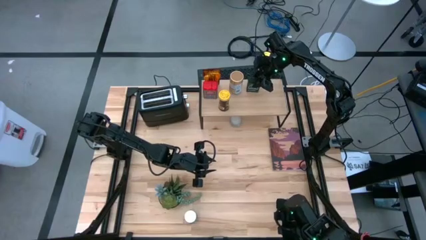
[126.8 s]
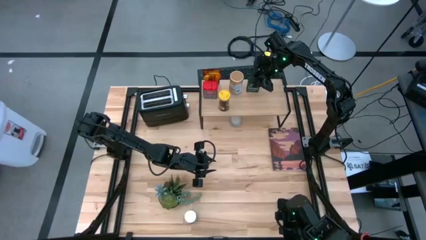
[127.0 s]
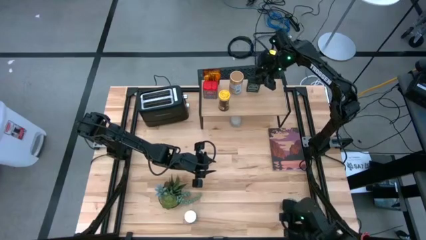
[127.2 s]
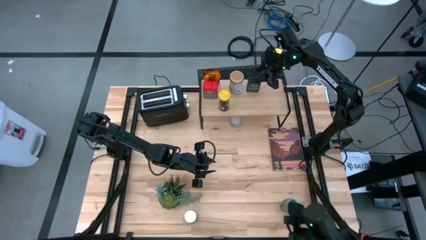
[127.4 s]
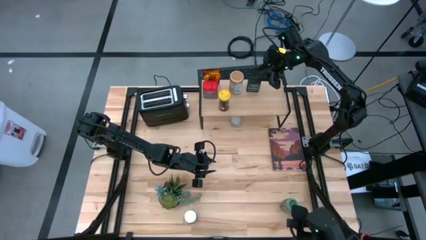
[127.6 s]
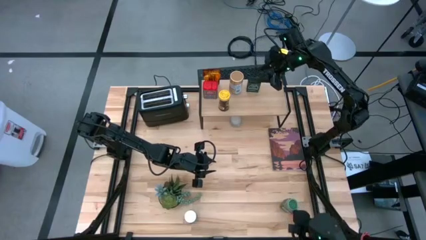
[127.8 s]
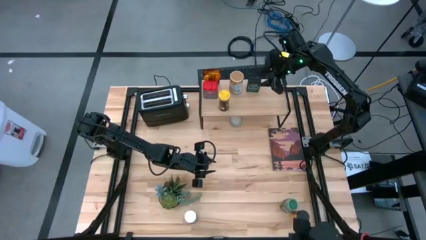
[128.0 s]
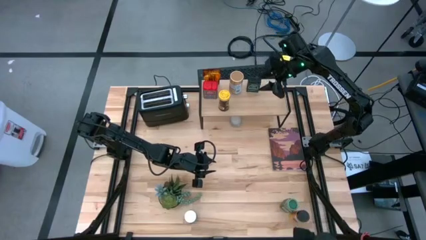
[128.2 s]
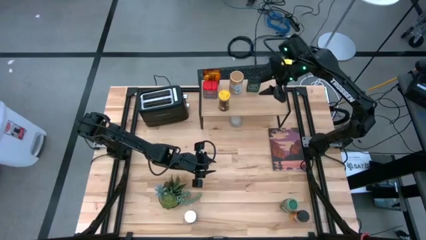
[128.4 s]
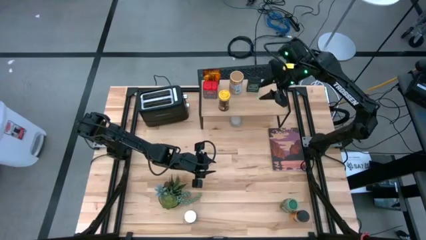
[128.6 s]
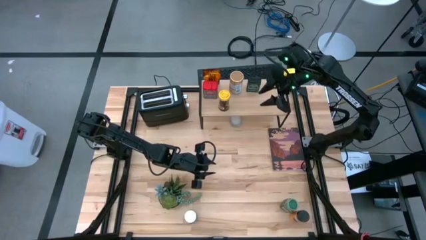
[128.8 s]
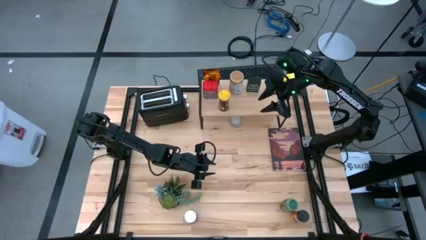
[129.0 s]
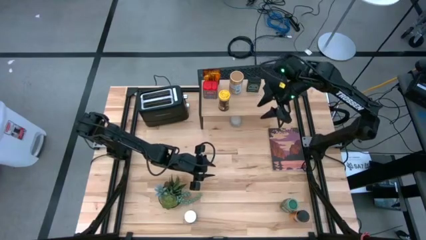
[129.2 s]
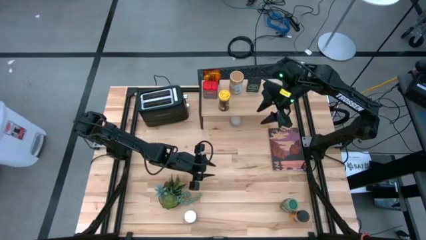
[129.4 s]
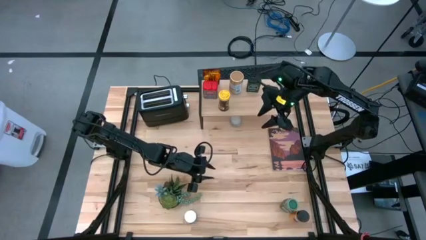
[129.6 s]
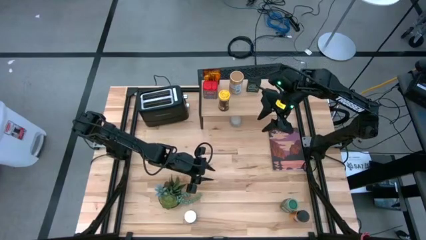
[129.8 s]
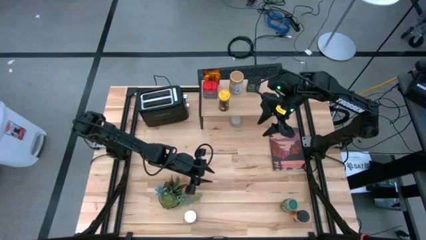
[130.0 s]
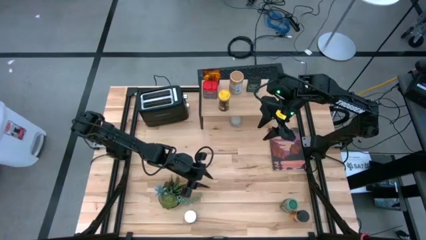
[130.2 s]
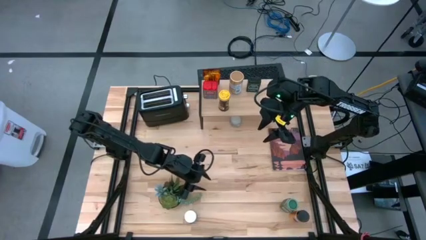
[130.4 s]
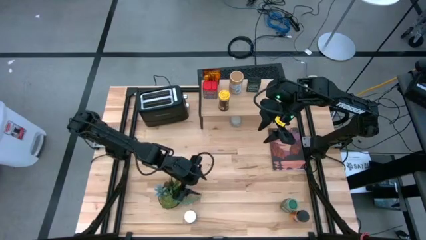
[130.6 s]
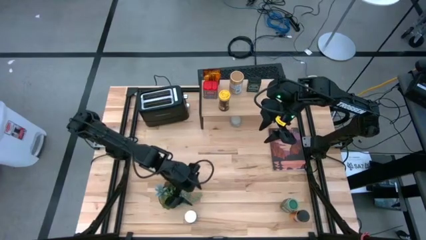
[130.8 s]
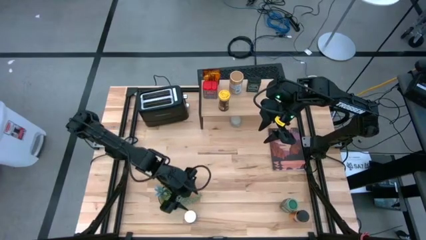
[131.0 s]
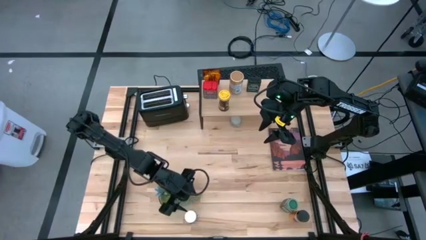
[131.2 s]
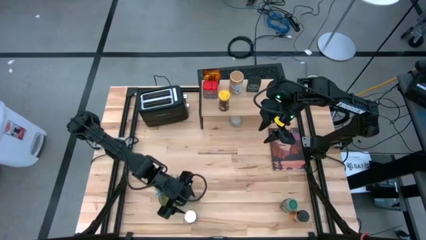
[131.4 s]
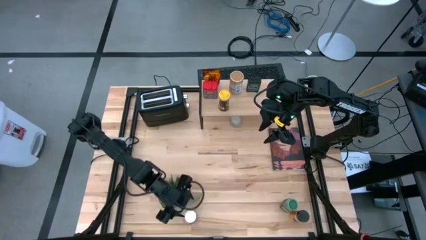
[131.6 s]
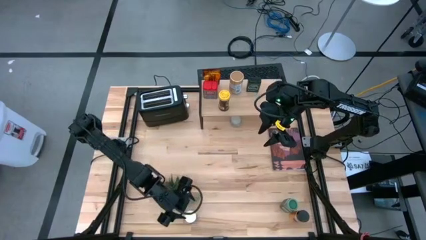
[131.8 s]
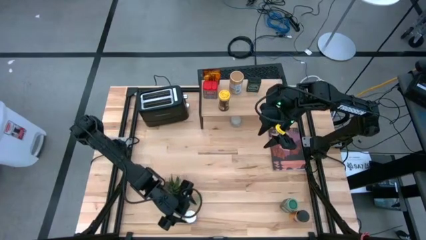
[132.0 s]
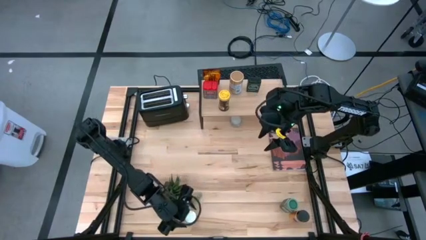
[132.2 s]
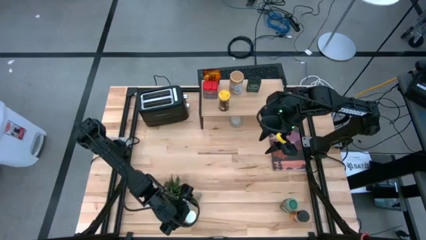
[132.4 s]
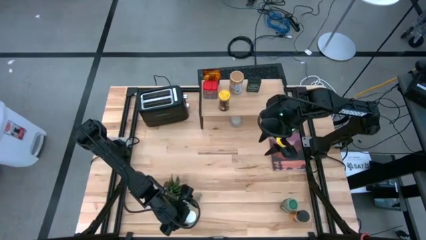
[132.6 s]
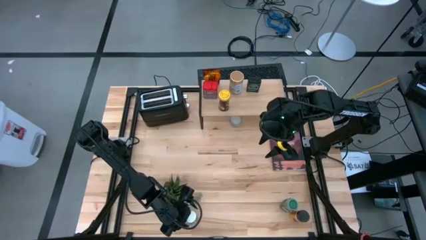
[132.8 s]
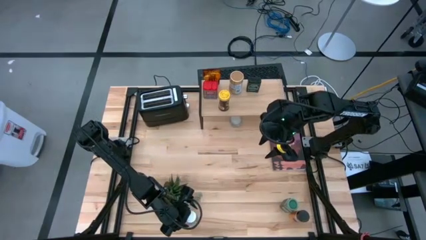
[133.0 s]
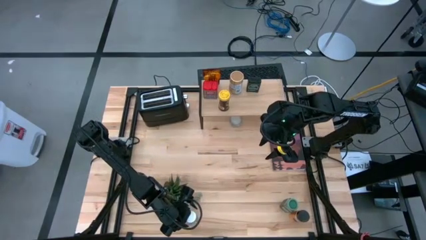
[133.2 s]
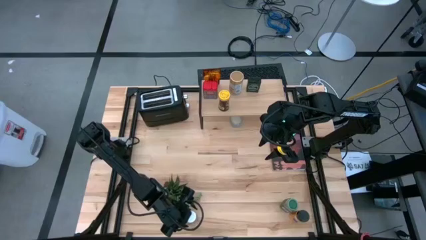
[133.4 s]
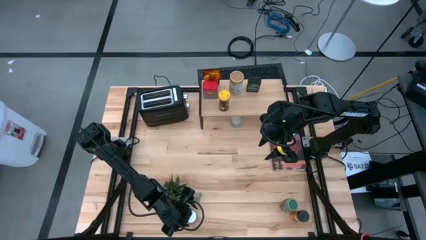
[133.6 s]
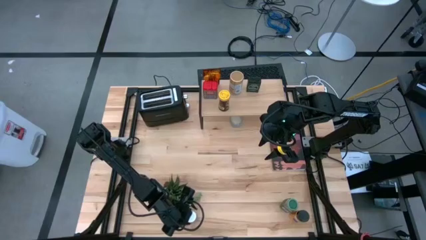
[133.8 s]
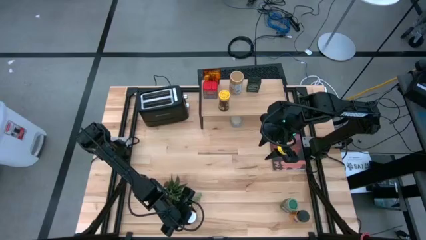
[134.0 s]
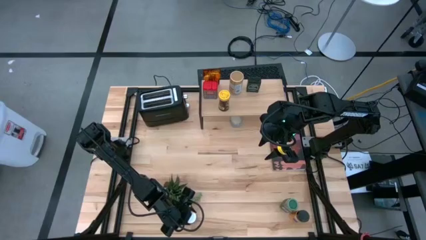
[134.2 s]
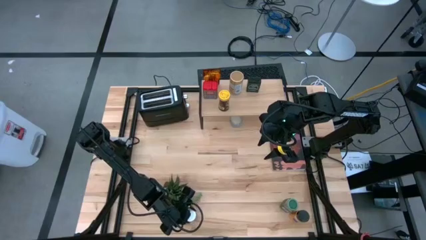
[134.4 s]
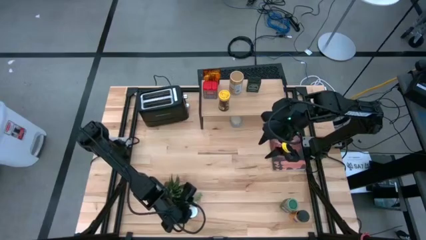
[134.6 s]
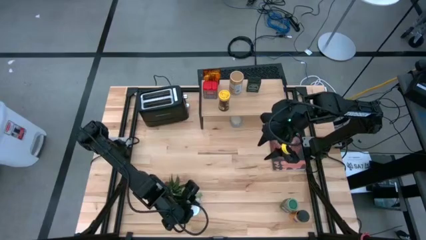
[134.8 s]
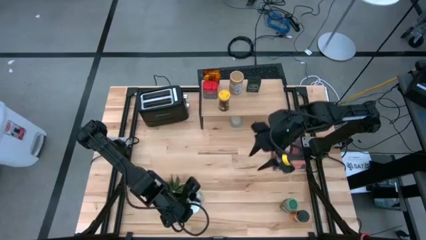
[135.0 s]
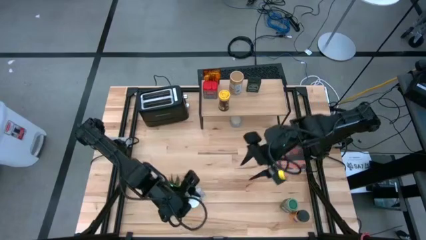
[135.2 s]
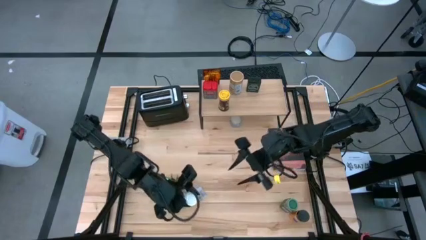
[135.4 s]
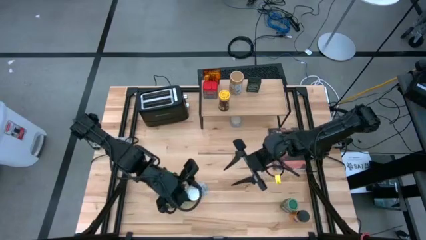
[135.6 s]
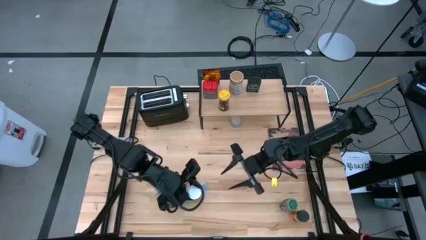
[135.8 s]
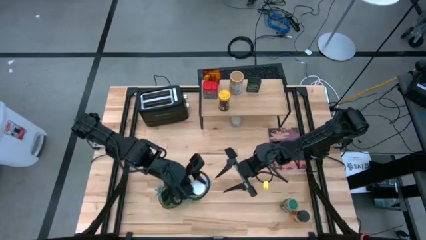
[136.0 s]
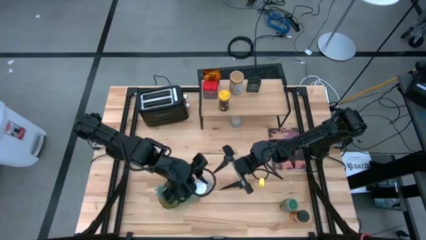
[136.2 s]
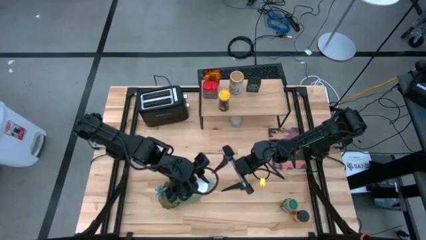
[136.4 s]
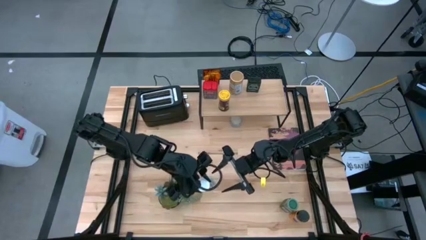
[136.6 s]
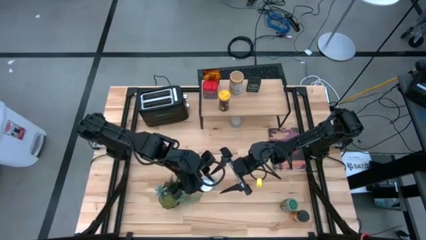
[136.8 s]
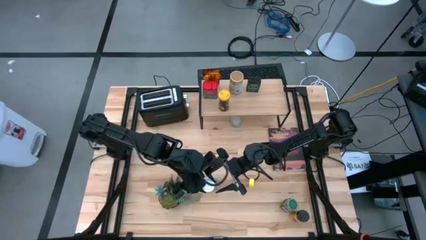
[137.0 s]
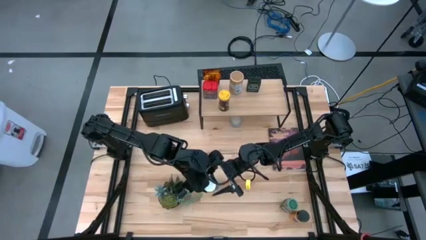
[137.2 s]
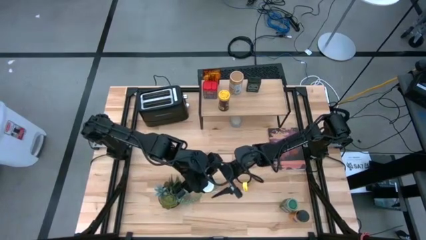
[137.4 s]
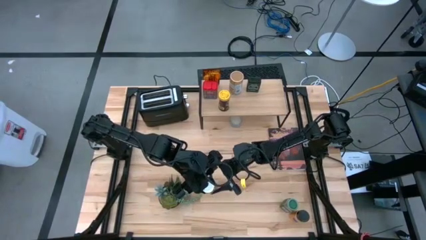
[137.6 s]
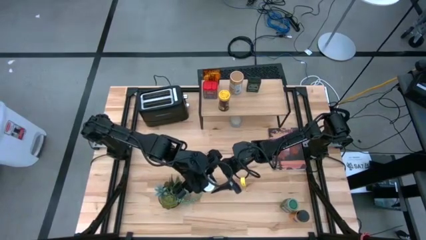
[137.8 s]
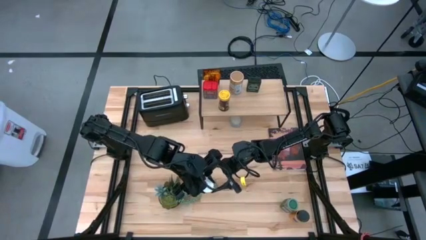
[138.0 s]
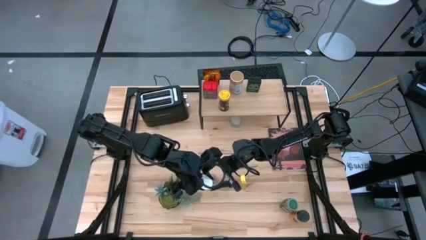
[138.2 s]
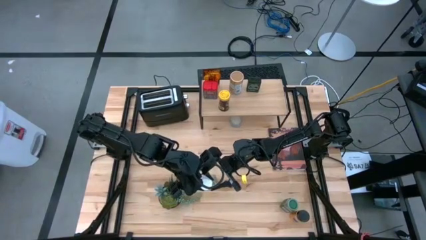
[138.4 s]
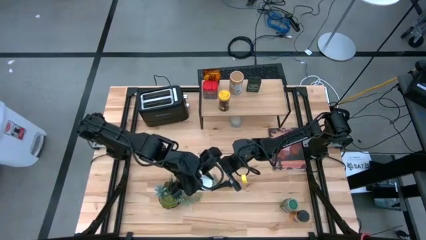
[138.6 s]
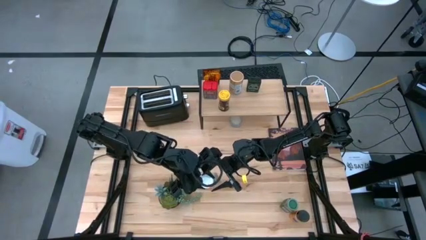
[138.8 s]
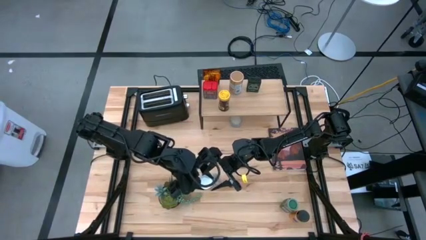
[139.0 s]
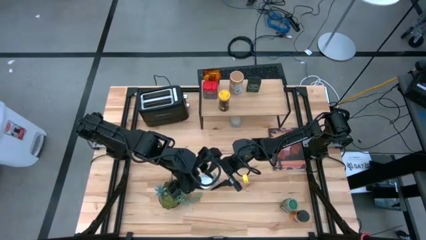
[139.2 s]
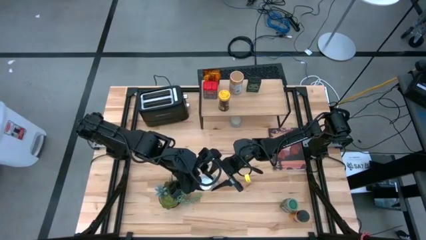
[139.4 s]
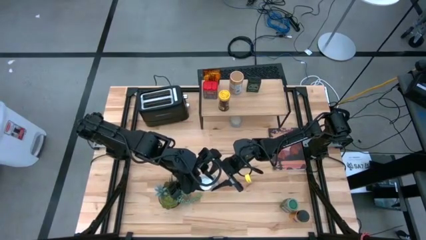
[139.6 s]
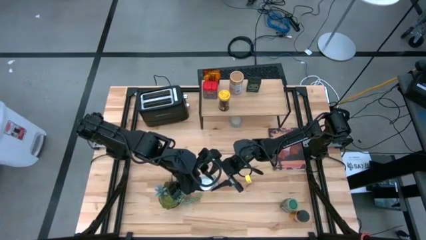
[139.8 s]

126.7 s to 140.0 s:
Task: Shelf spices
Put the white seasoning bottle on the shelf

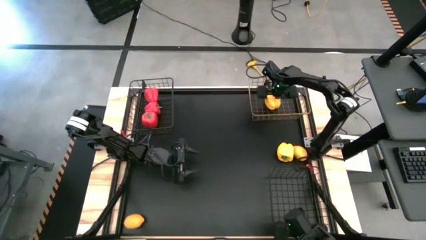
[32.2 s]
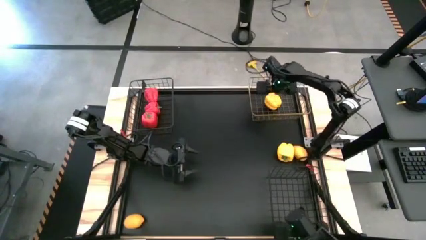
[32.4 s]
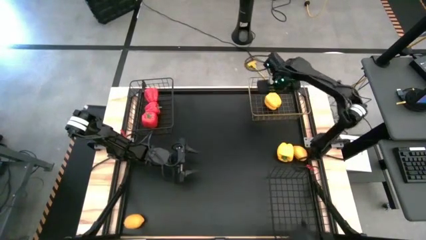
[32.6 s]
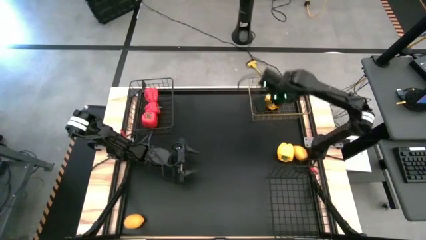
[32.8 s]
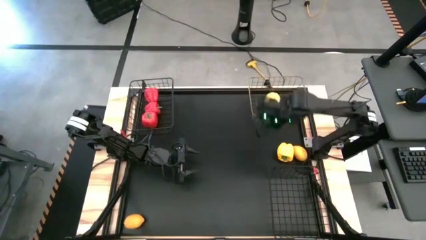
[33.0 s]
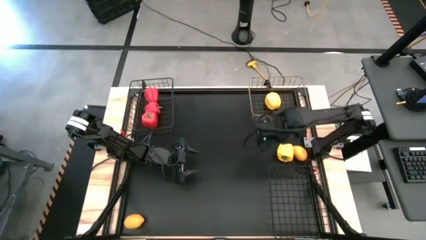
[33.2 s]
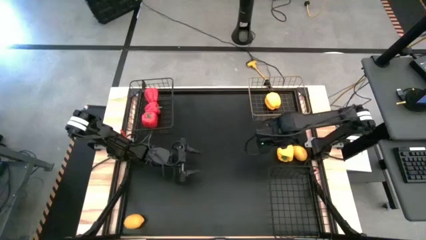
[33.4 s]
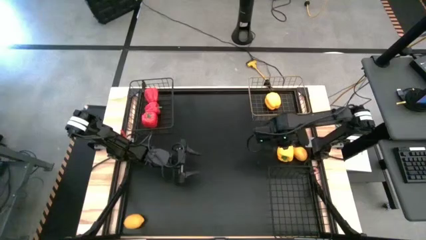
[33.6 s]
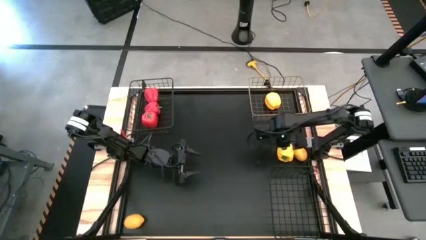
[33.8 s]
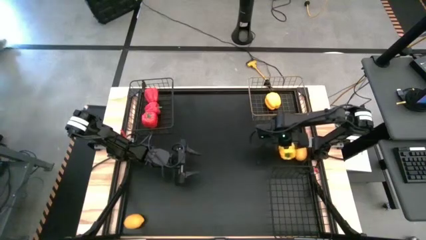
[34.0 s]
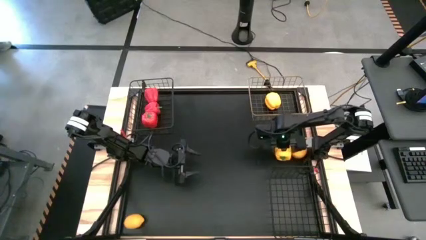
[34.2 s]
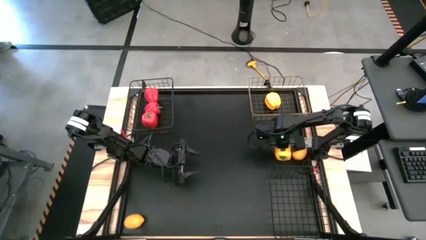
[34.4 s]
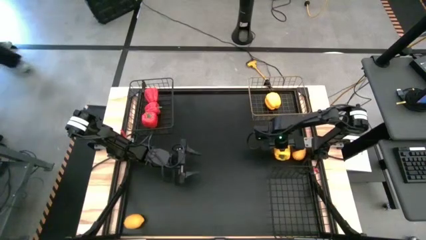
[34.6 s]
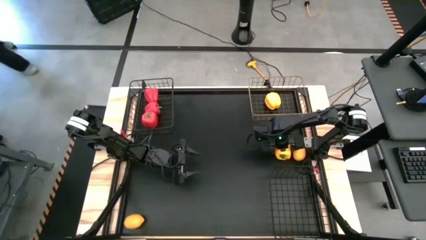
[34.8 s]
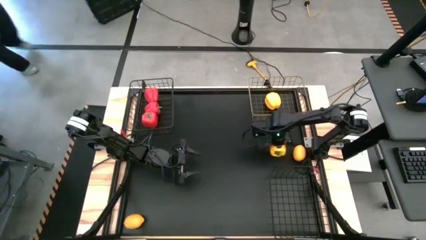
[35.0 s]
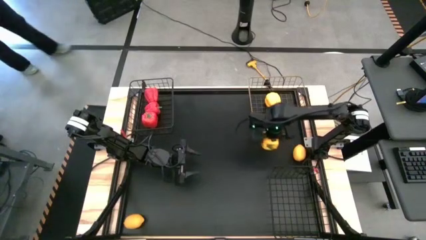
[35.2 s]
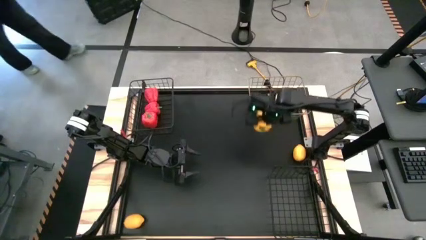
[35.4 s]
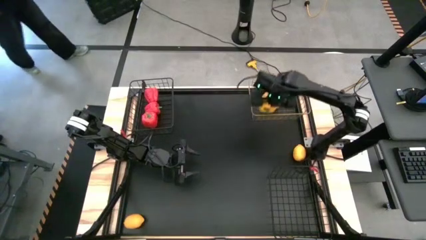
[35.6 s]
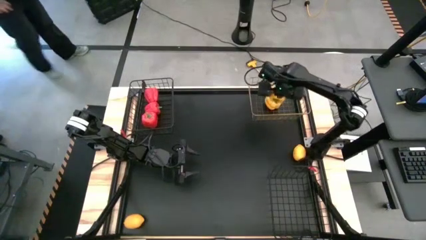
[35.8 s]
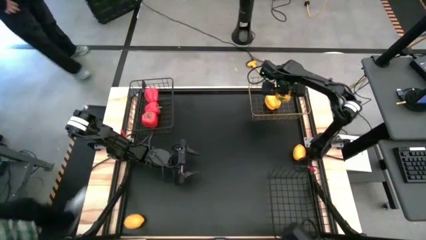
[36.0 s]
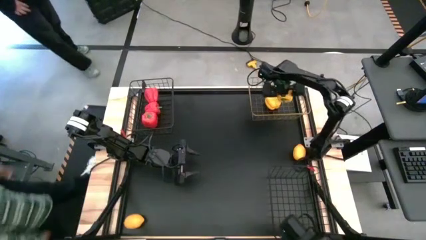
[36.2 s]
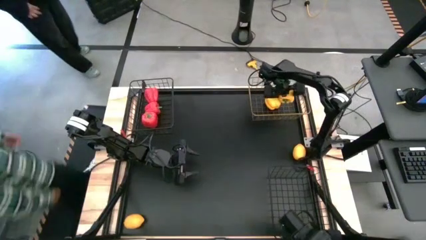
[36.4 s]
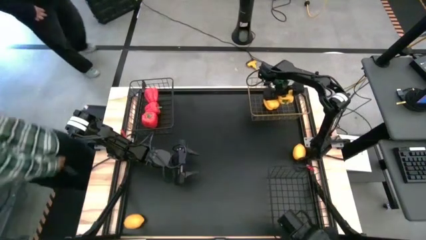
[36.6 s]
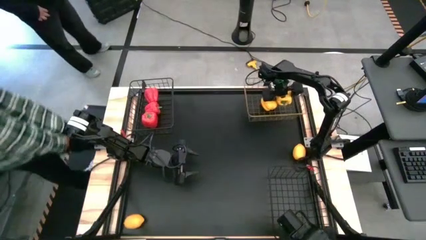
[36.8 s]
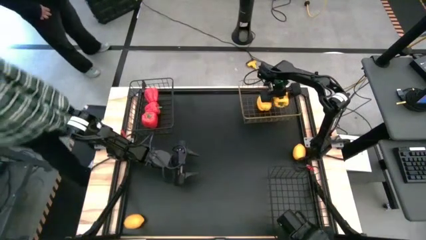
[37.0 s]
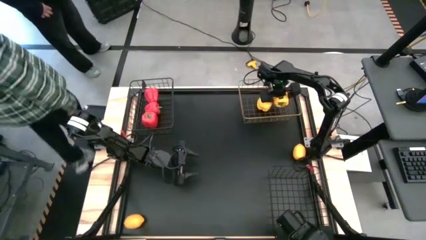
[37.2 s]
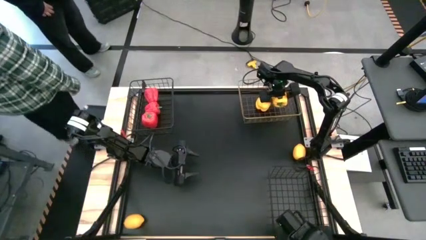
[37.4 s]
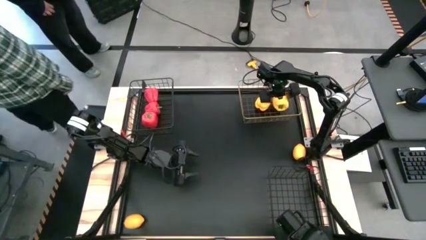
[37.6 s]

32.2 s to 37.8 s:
Task: Sort produce into baskets
Put the yellow bell pepper into the gold mesh basket
